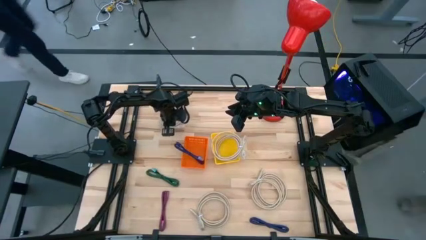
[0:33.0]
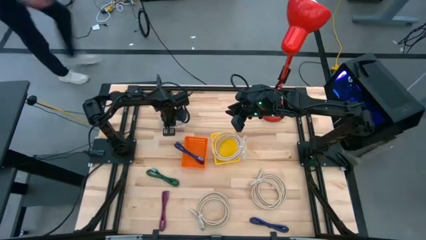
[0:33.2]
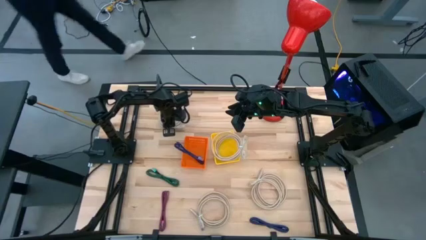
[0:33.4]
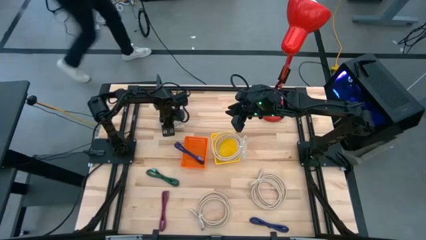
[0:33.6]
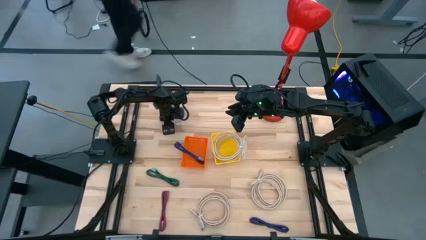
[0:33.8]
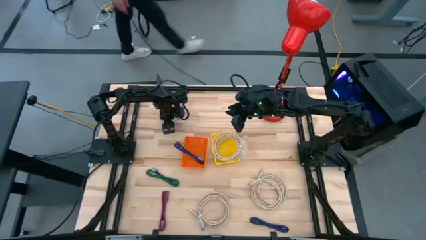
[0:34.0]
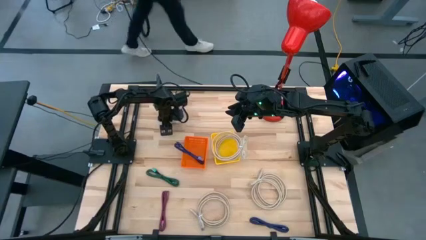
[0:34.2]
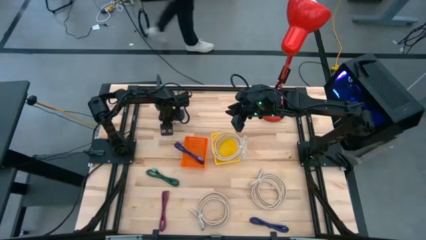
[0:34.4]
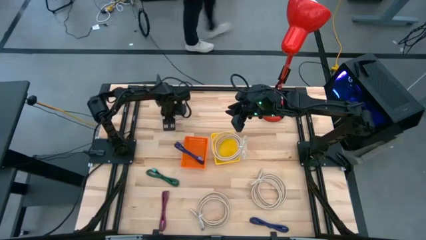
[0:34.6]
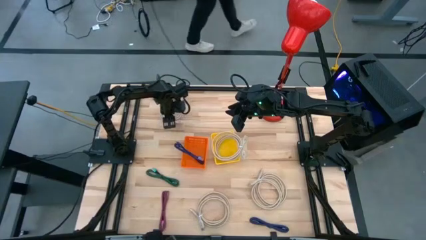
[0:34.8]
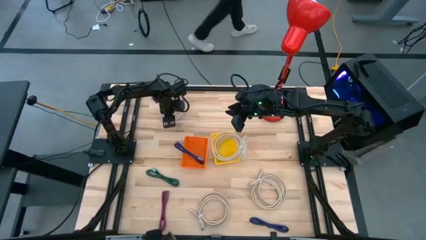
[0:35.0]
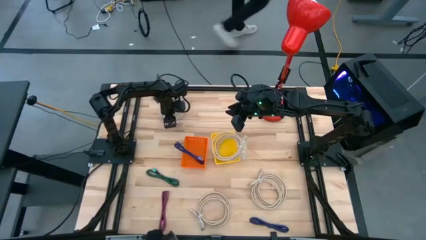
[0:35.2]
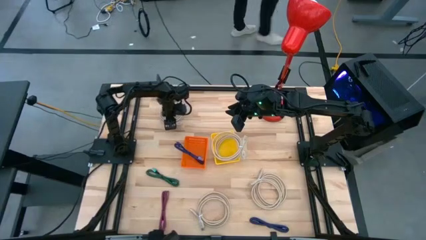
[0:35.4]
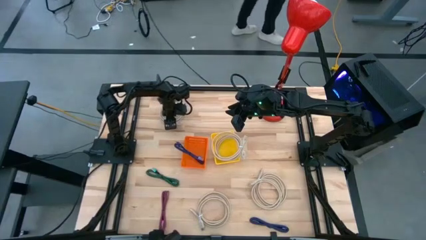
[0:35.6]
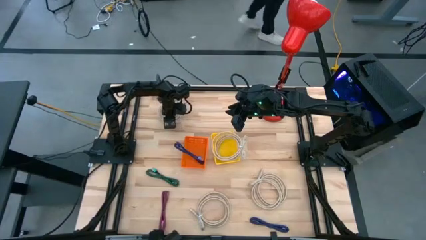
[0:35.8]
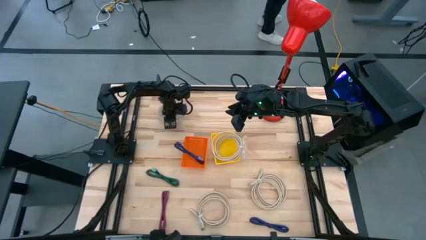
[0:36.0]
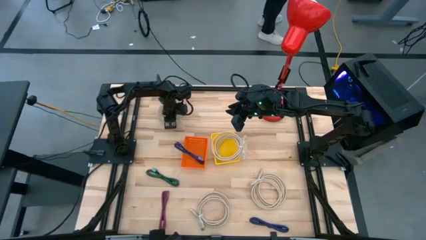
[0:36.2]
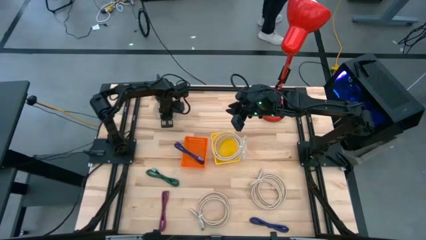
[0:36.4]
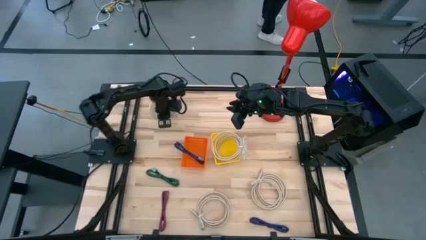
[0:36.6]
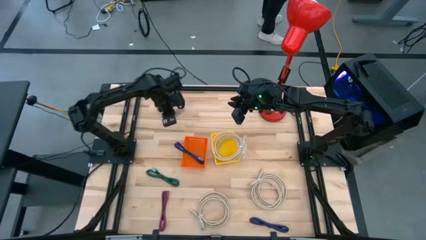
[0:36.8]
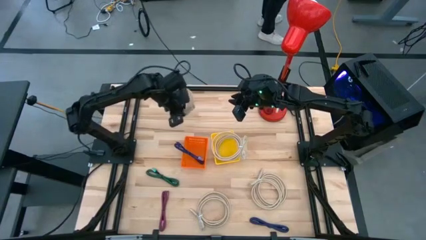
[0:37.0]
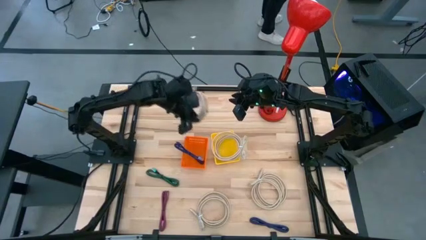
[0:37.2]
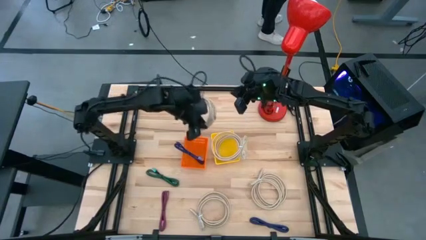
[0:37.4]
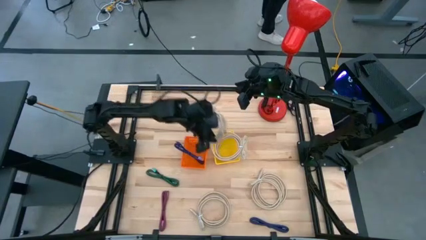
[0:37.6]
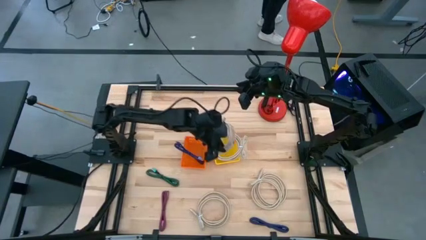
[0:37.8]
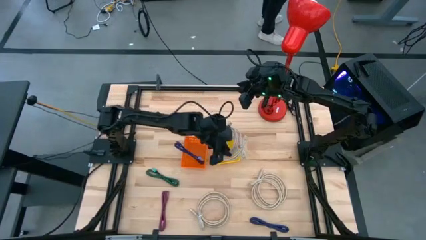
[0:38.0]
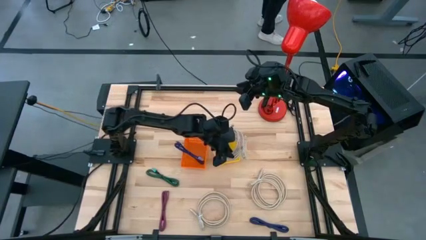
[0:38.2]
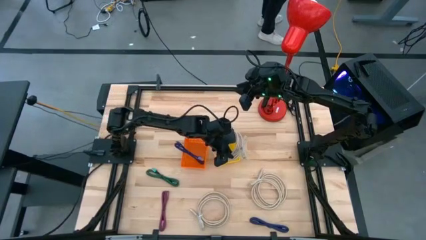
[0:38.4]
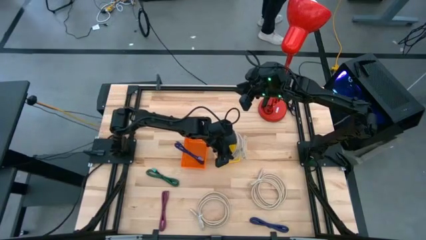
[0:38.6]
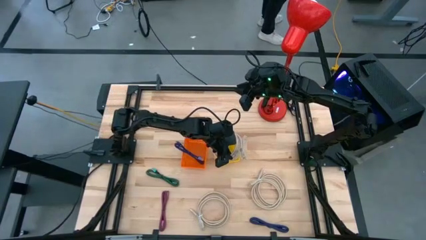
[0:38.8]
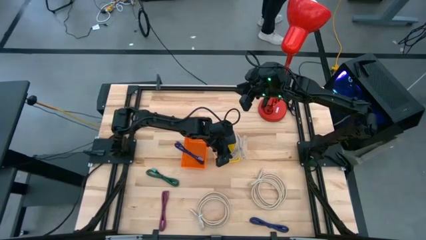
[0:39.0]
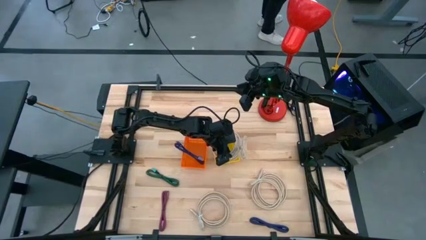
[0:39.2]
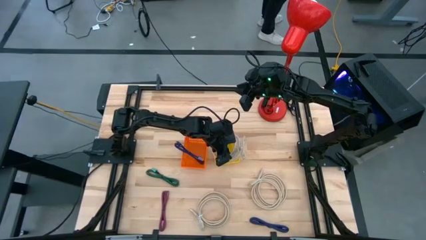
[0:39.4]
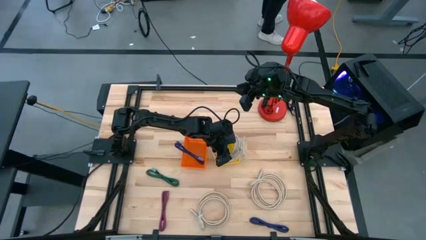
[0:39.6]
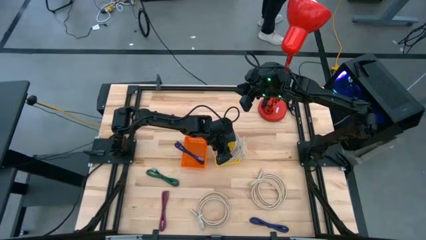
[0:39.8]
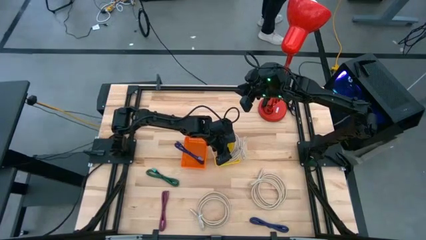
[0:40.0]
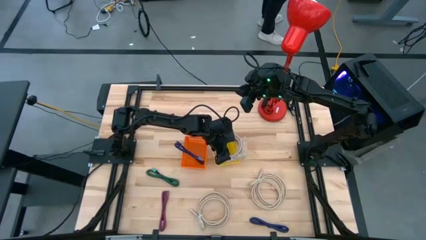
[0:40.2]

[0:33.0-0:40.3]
Task: Pick & Place USB Port
Put the brown HDMI cable into the yellow bin

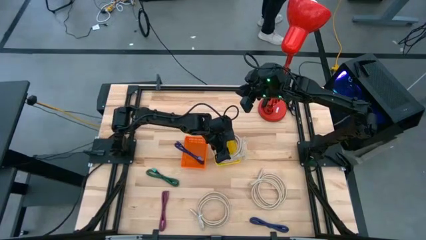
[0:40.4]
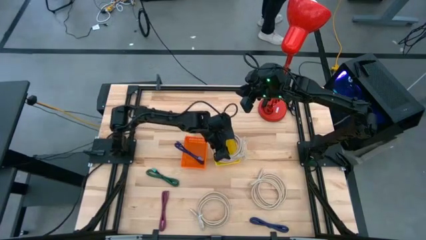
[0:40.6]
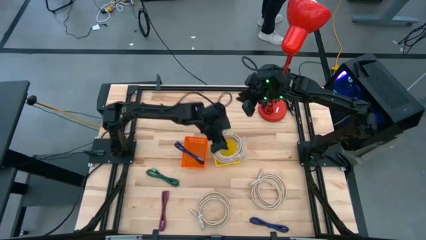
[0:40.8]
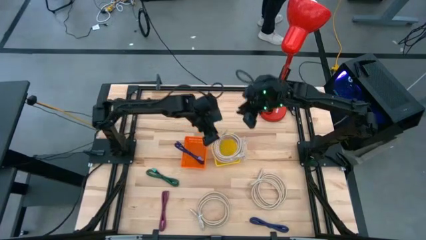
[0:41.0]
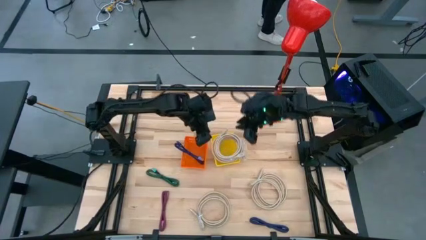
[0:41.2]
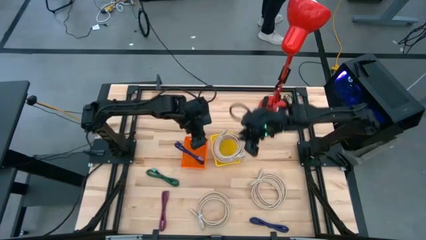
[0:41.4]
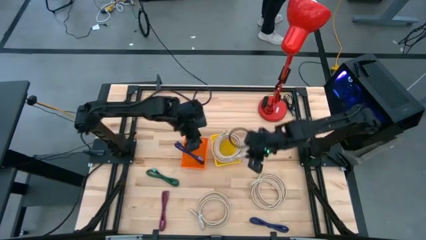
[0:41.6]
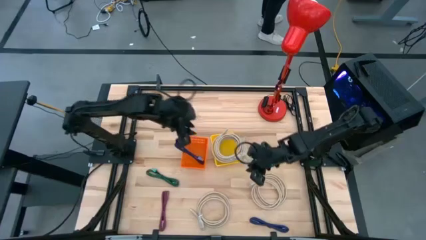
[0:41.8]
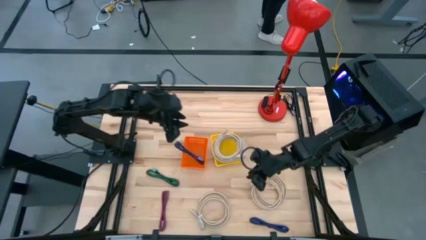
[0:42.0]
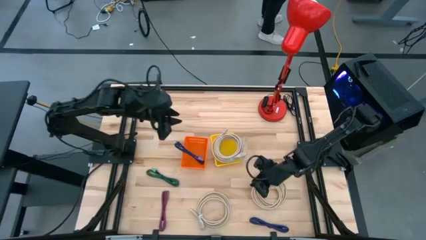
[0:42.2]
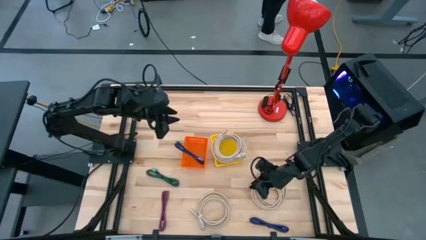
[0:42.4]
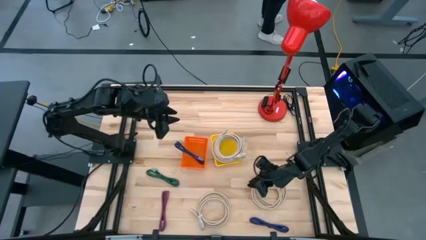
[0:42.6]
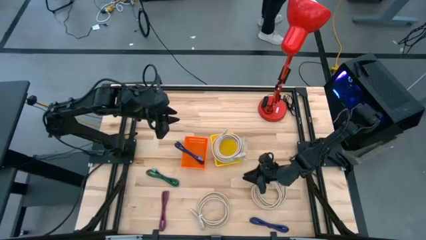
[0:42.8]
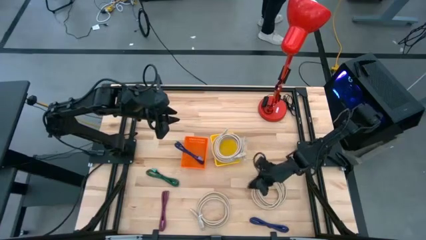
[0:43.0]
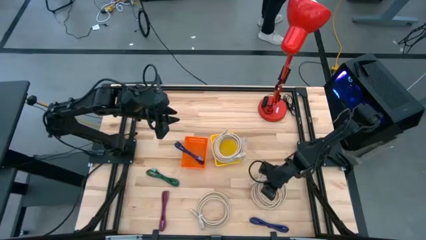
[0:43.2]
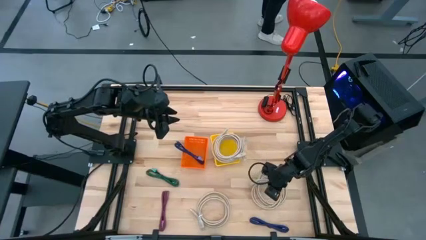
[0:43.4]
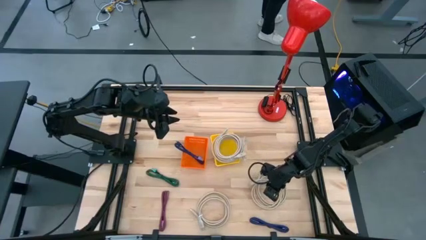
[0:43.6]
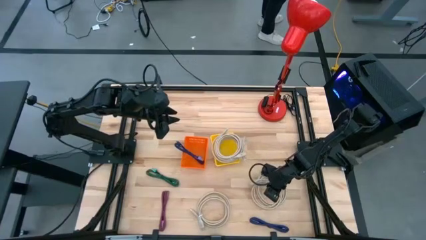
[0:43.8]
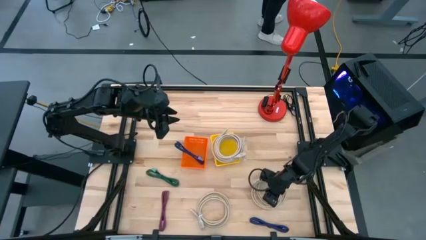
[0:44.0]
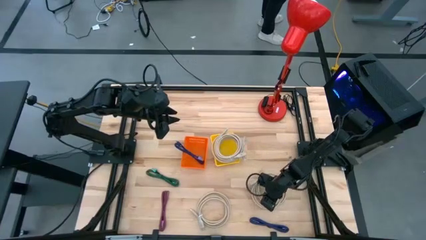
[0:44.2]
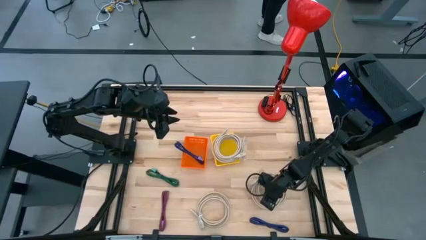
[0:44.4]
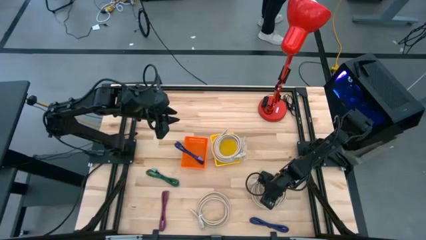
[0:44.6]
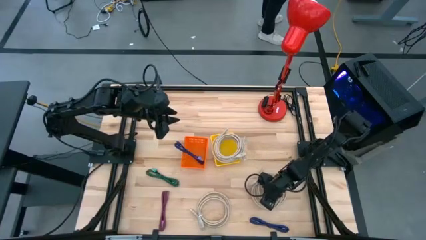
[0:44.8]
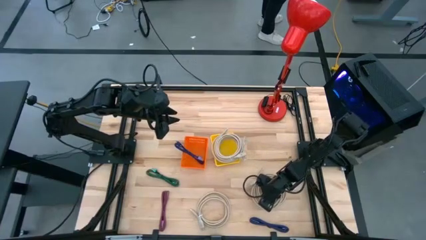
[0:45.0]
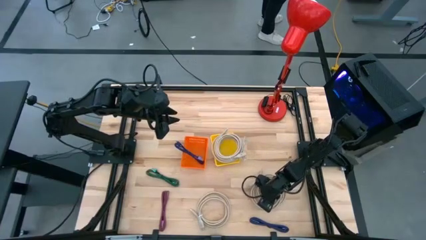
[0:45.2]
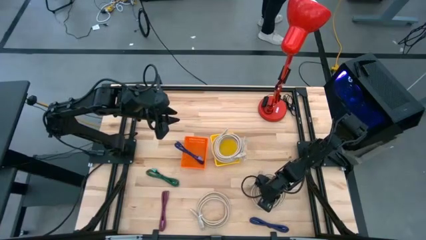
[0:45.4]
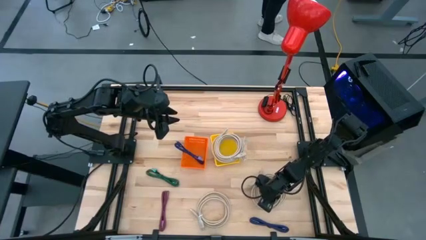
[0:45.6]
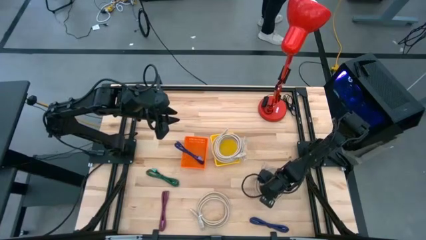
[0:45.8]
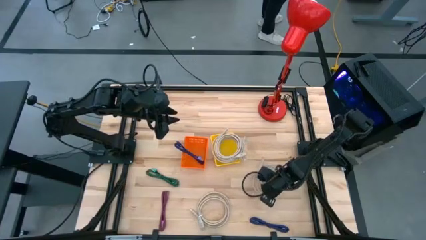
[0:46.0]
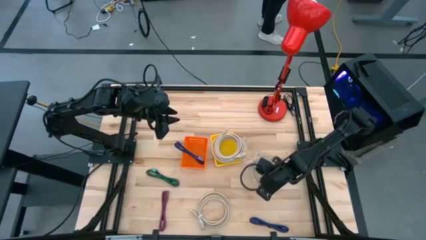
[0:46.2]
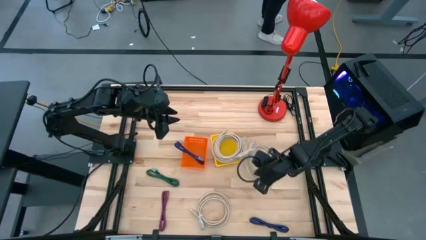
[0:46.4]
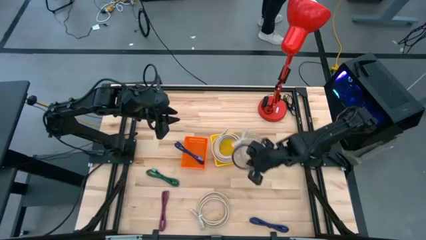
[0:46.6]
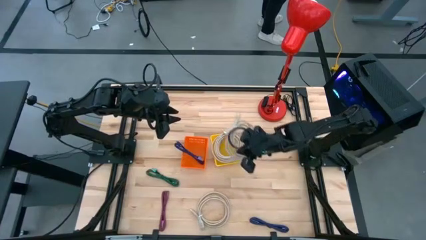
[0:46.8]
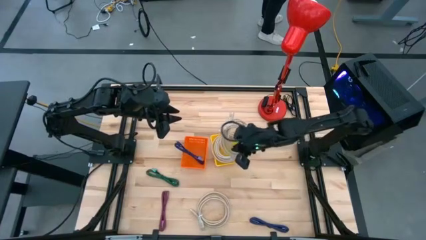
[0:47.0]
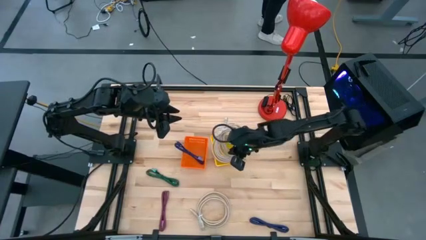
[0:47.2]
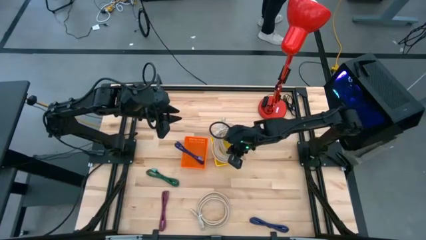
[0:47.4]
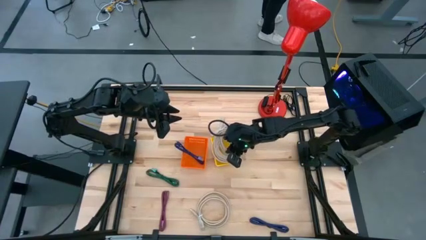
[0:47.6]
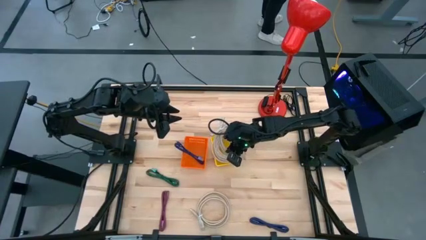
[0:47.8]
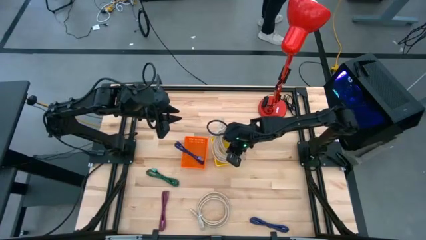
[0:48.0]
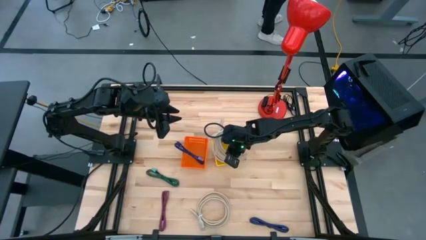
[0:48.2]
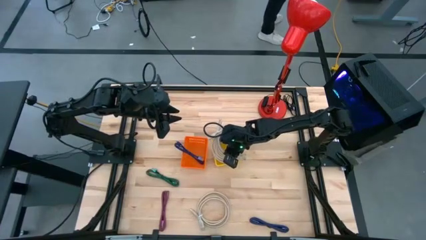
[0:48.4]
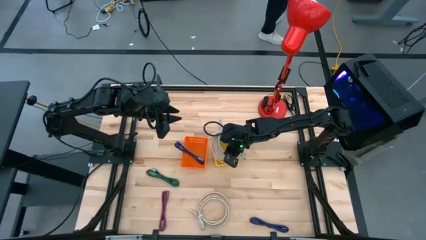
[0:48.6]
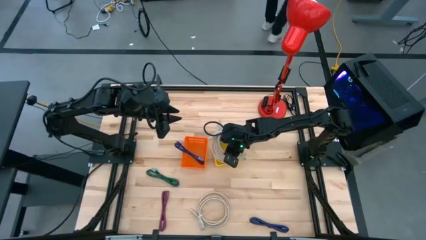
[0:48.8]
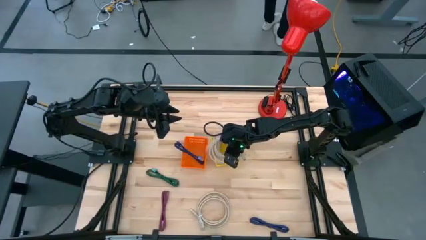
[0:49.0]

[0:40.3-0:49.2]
Put the brown HDMI cable into the yellow bin
